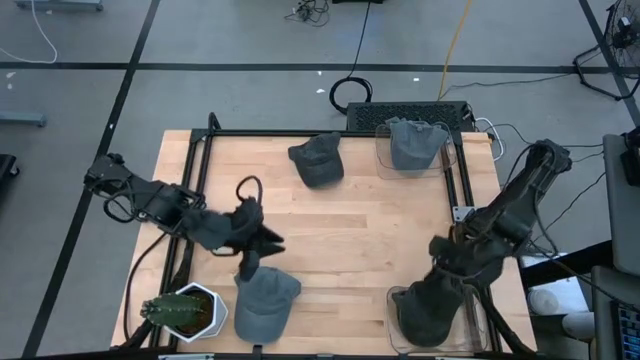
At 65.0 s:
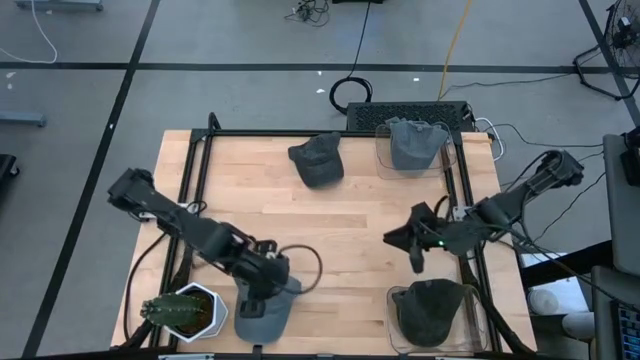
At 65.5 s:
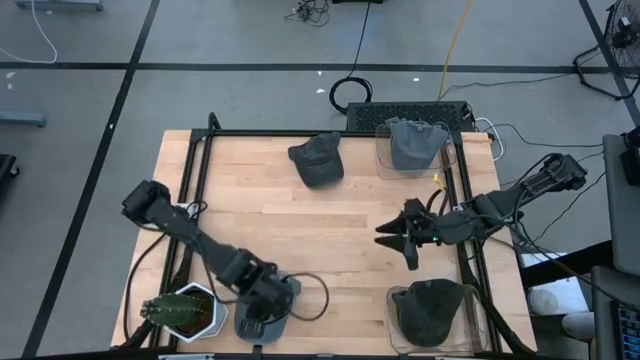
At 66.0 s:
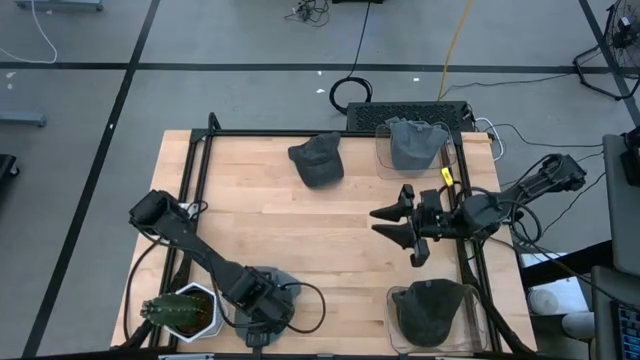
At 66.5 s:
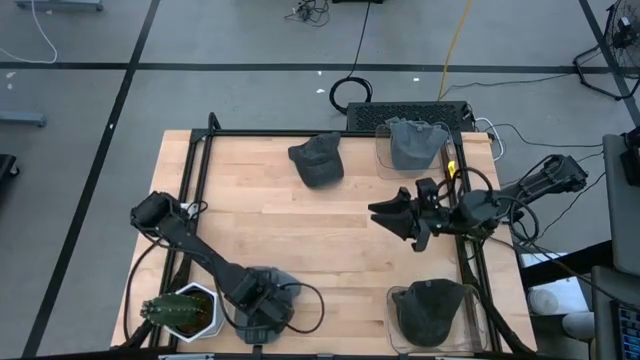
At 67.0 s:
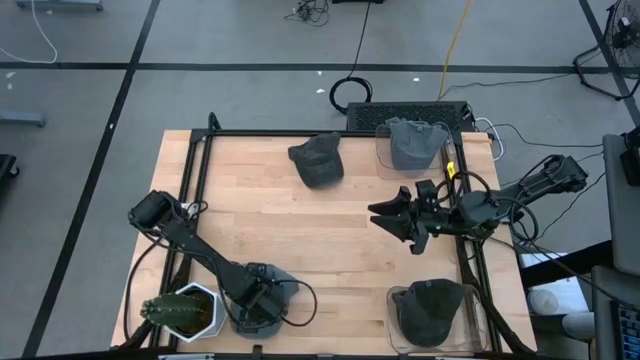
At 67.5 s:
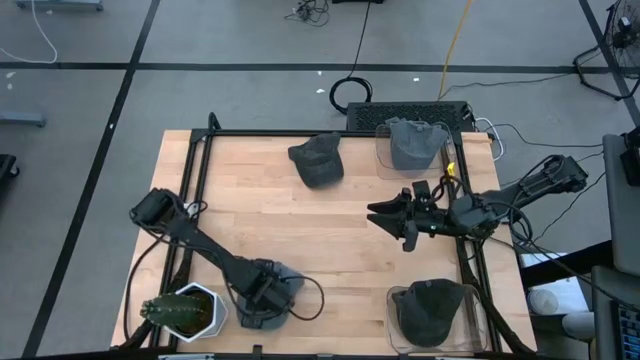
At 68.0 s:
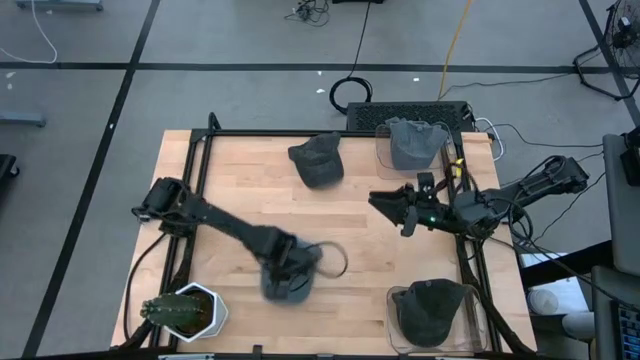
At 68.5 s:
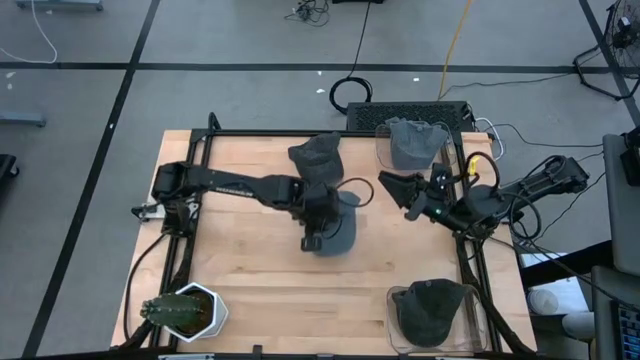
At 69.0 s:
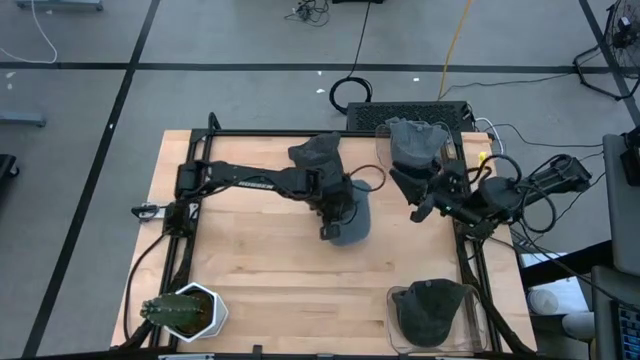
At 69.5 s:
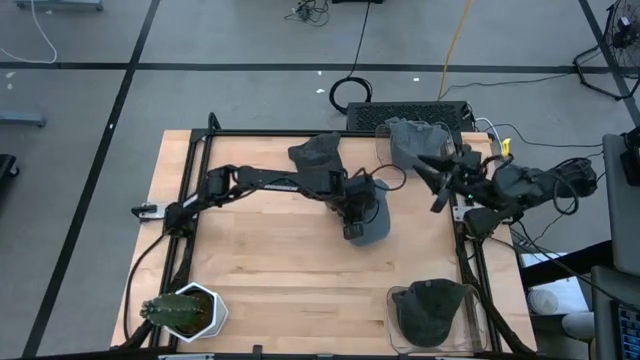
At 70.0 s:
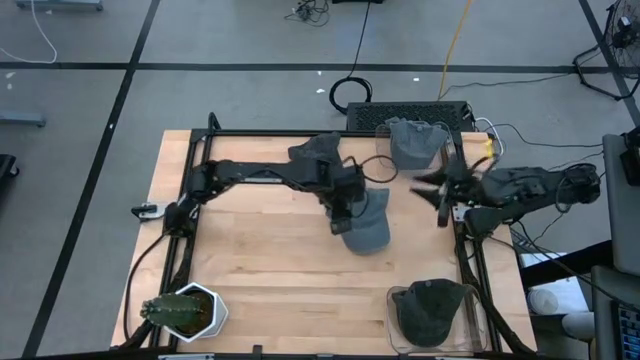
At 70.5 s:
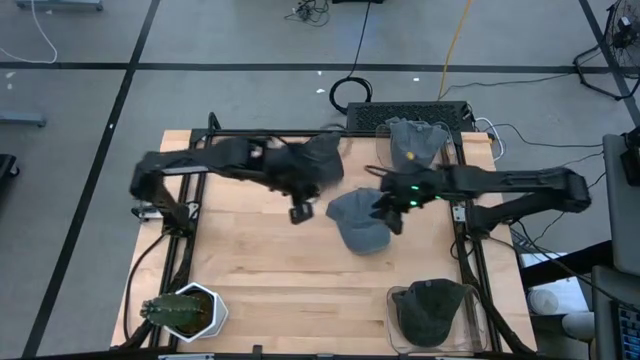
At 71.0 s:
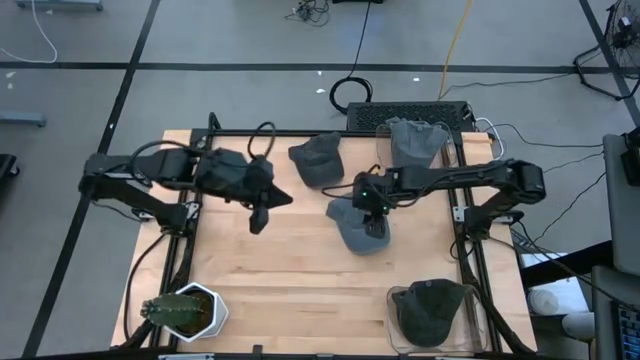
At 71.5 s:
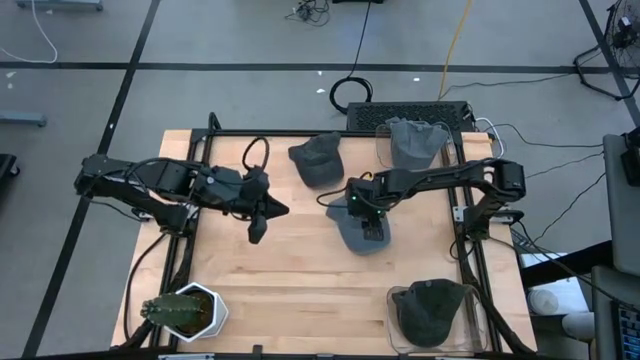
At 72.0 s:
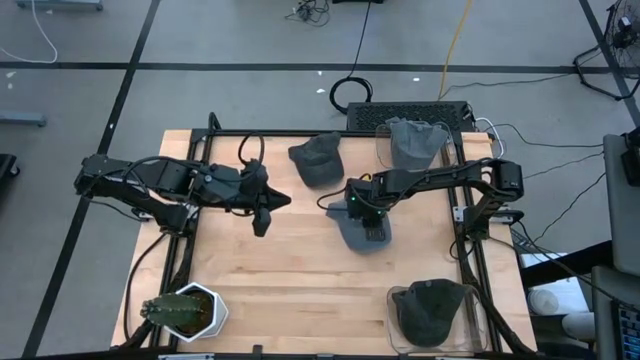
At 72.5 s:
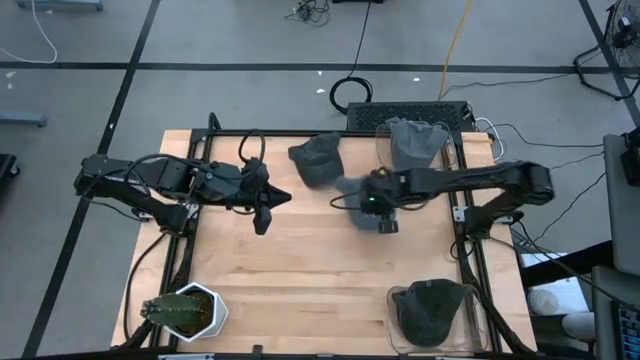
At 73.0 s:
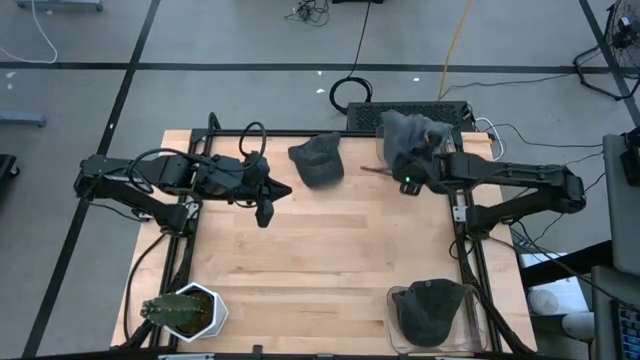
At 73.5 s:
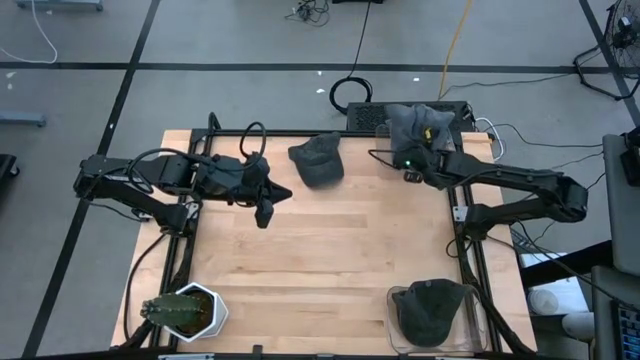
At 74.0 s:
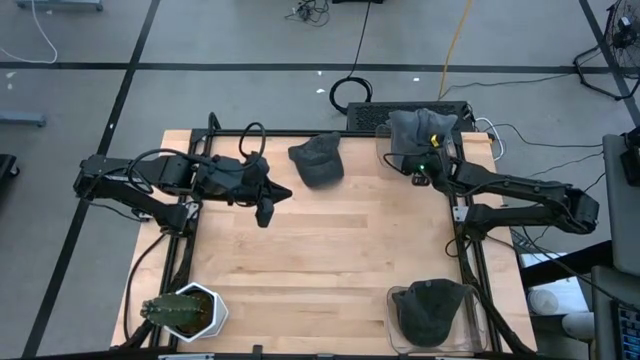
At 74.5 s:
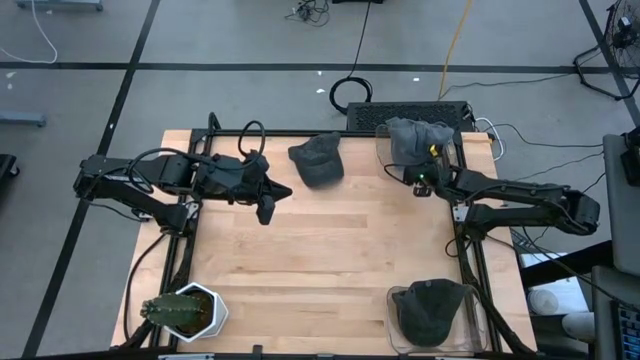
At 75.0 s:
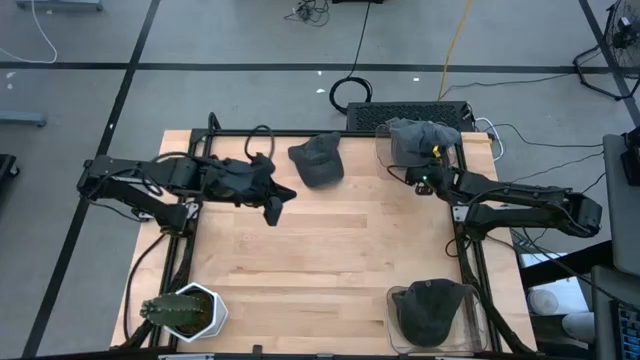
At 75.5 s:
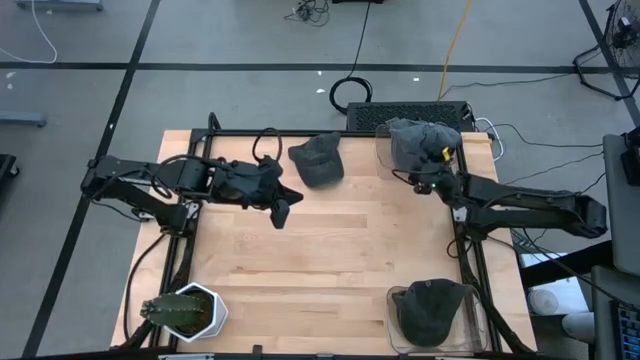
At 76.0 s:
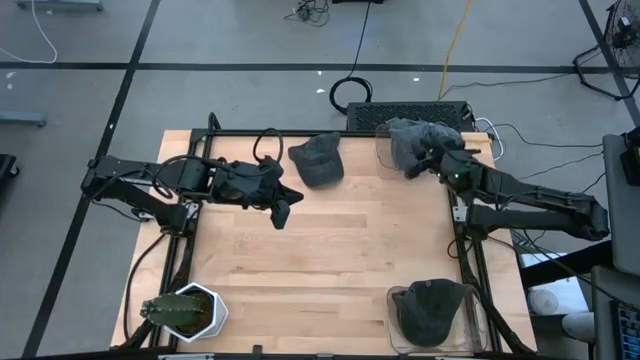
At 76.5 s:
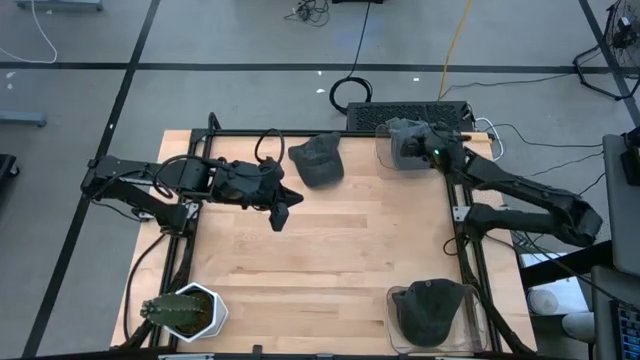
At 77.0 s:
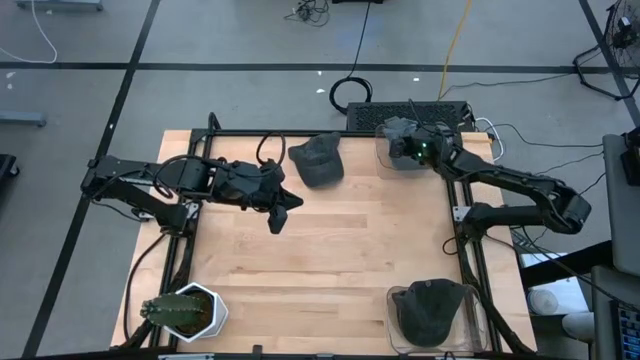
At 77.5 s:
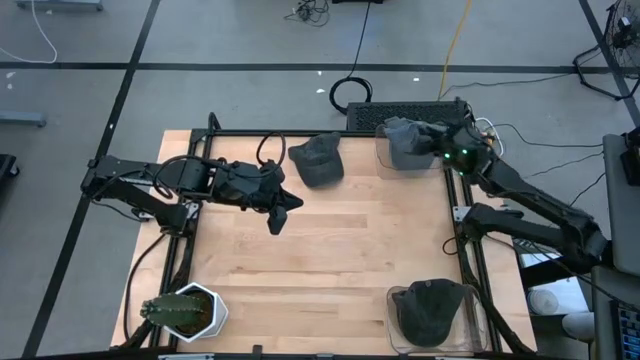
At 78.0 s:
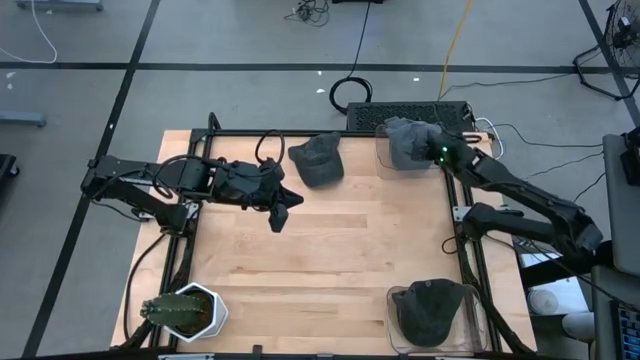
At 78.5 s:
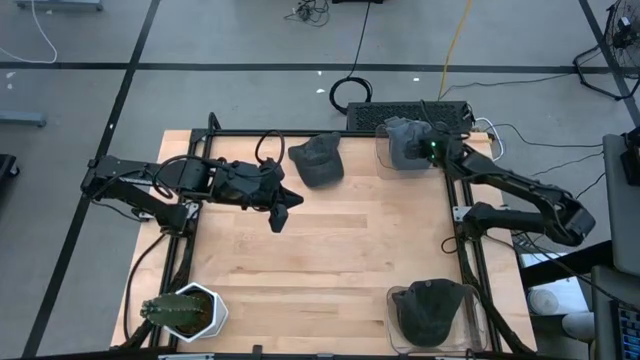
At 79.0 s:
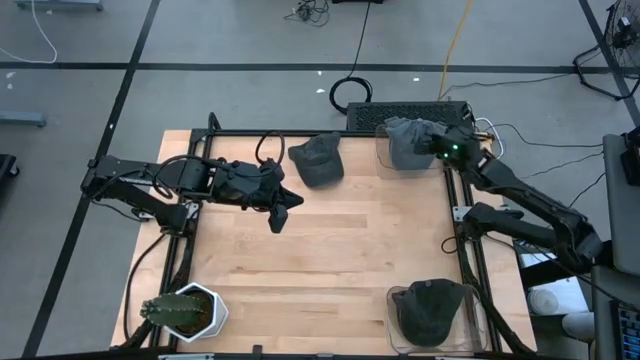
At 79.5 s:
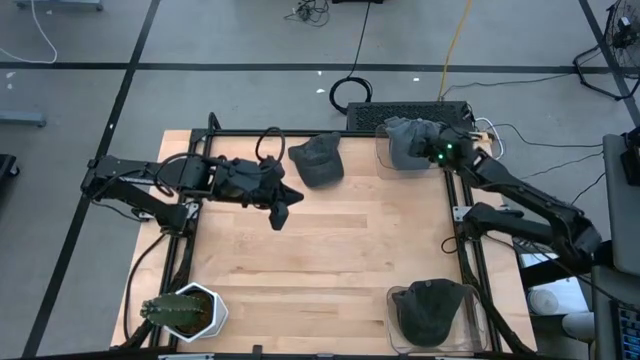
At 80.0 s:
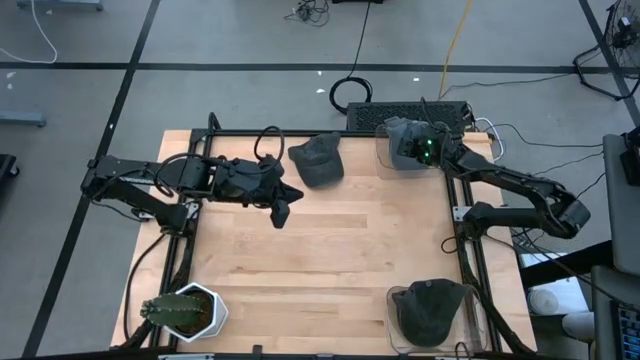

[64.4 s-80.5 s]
Task: Pick & Place hat
Put the gray cap into the top transparent bin

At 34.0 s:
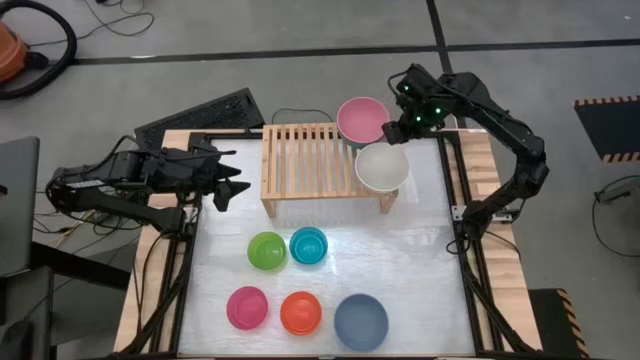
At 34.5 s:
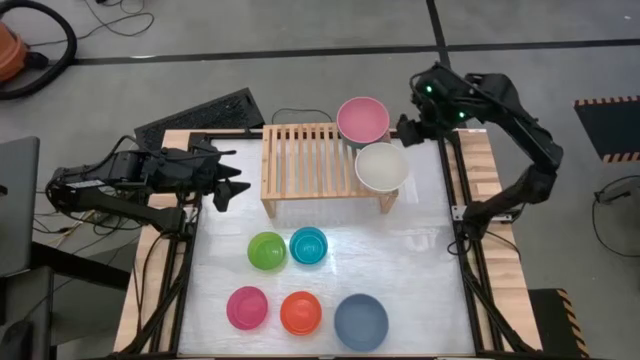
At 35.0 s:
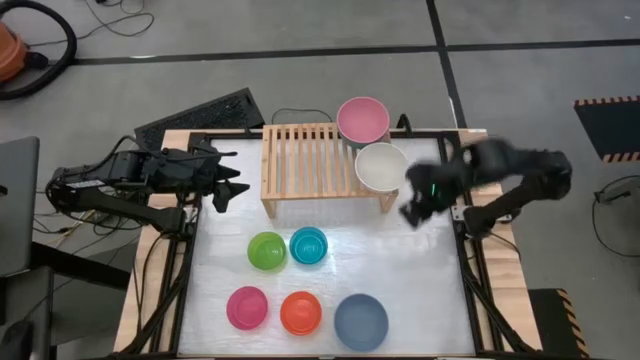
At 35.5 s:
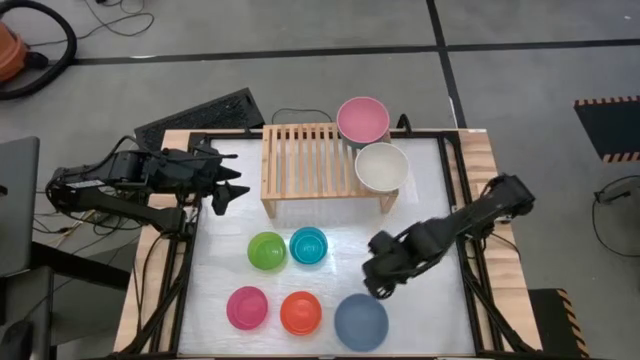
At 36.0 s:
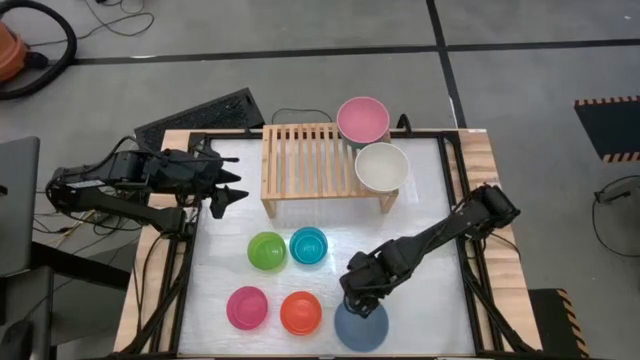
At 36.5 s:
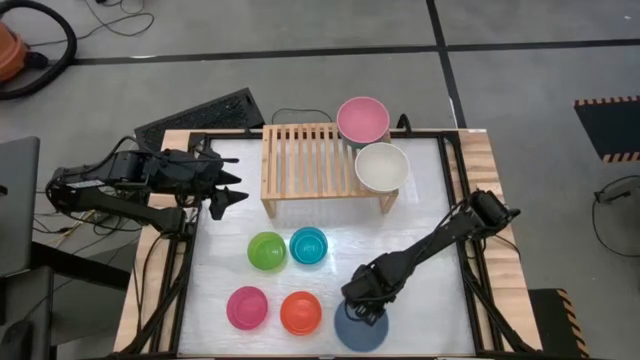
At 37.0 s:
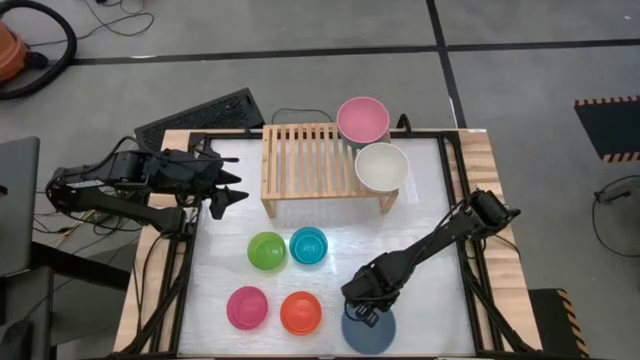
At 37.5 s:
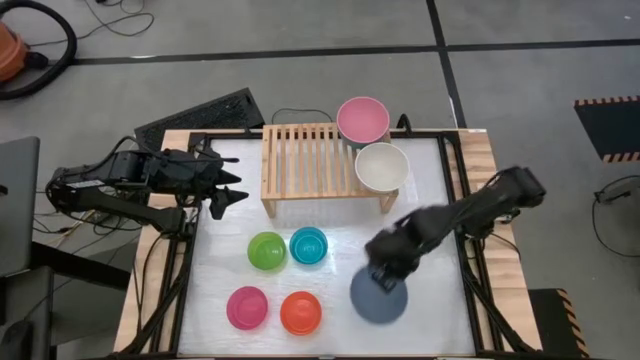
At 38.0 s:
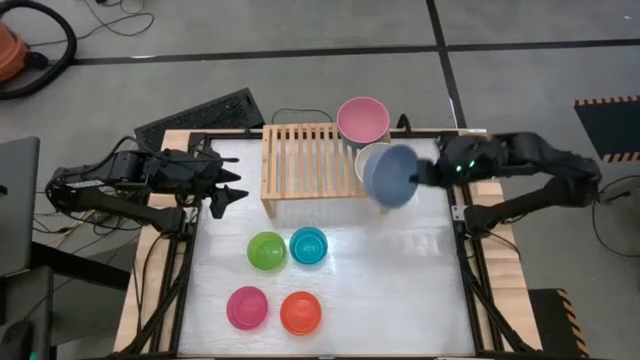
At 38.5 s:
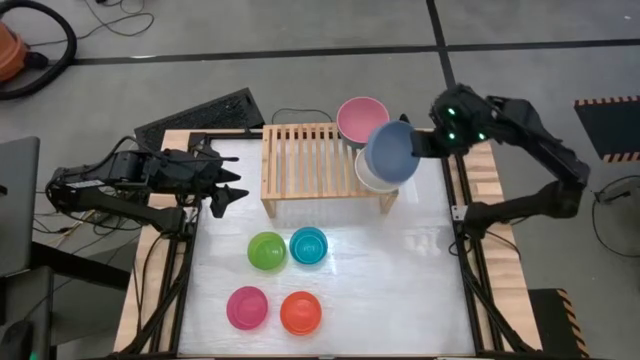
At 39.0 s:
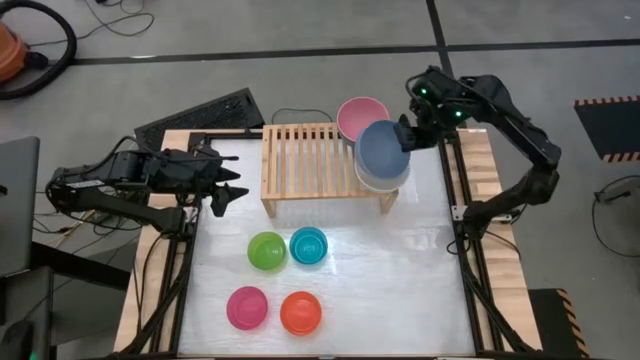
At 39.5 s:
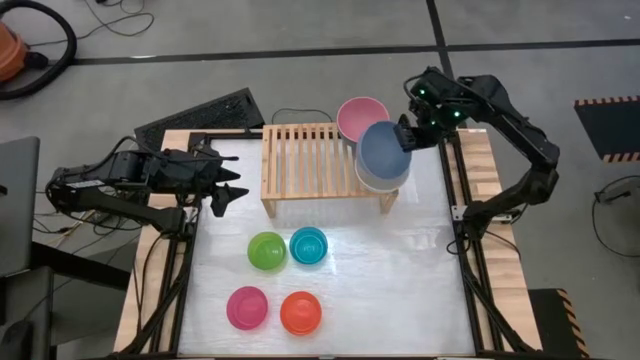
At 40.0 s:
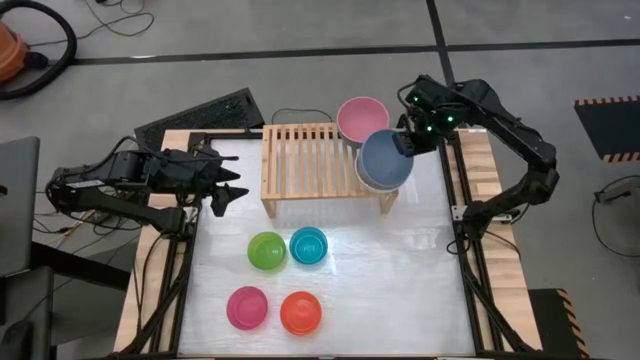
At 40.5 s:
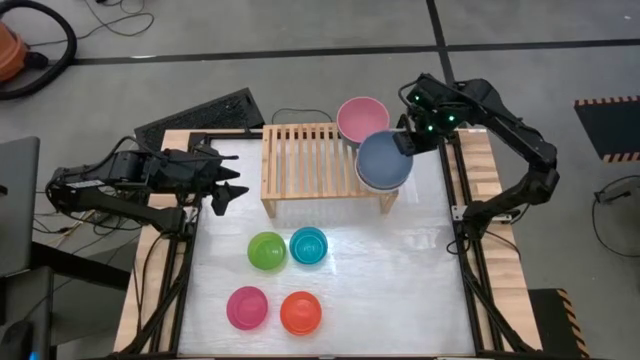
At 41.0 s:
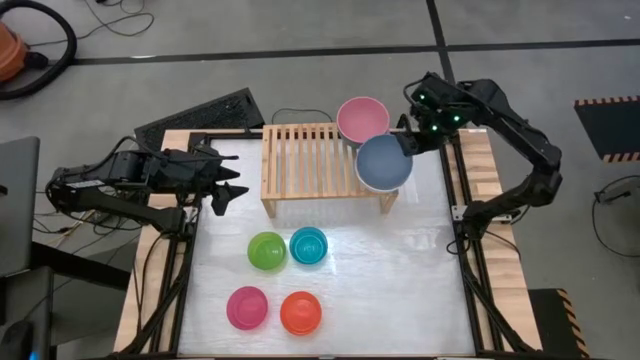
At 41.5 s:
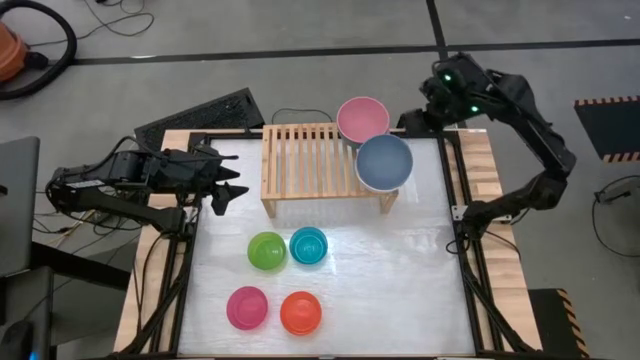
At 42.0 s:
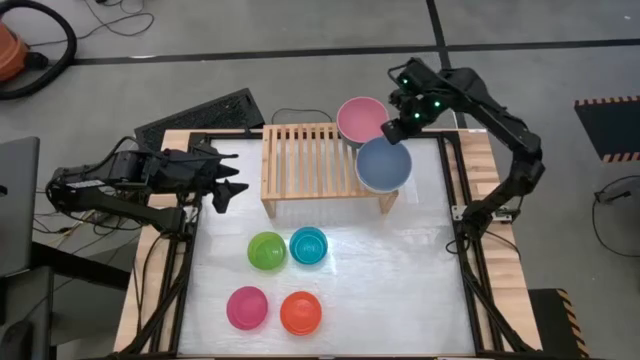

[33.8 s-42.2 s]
Task: Place and stack bowls onto a shelf
Stack the large gray bowl on top of the large white bowl on the shelf
